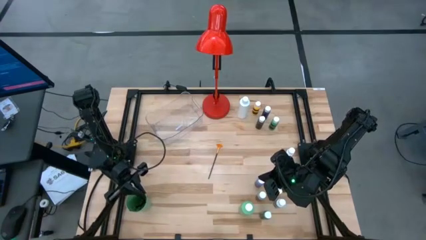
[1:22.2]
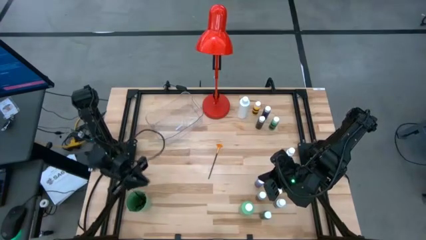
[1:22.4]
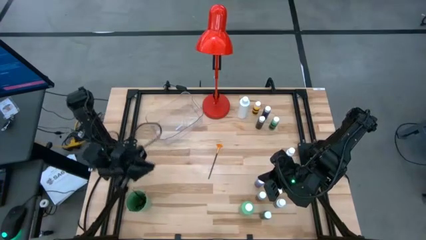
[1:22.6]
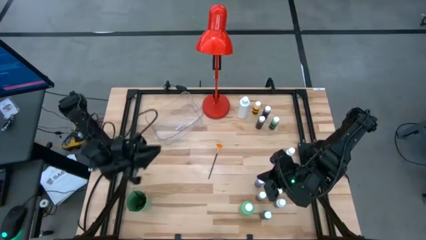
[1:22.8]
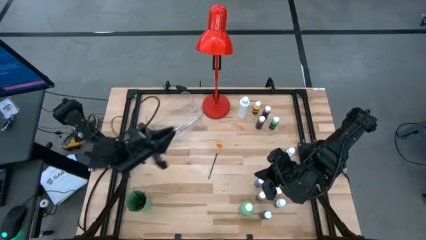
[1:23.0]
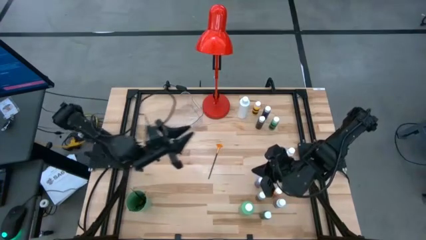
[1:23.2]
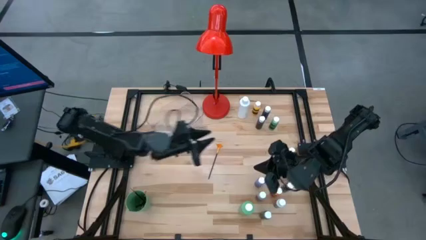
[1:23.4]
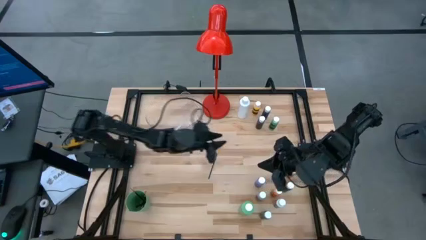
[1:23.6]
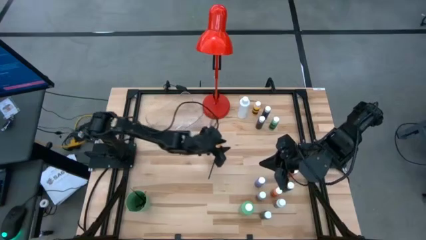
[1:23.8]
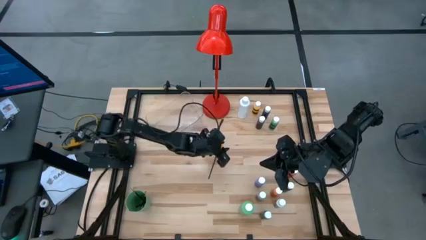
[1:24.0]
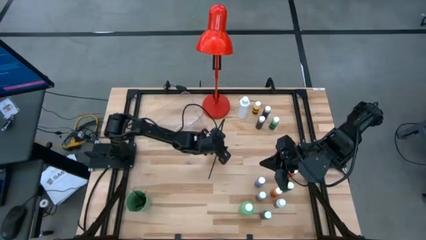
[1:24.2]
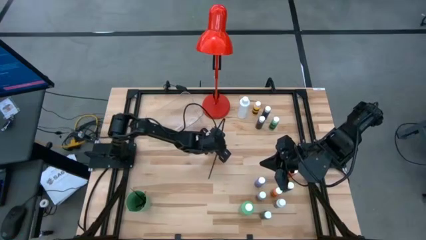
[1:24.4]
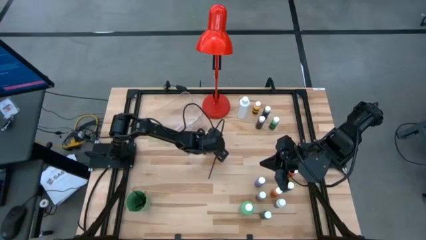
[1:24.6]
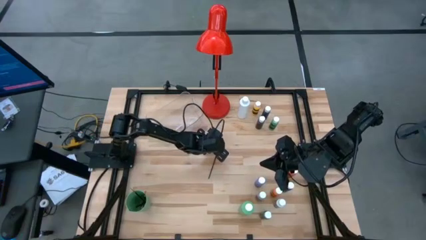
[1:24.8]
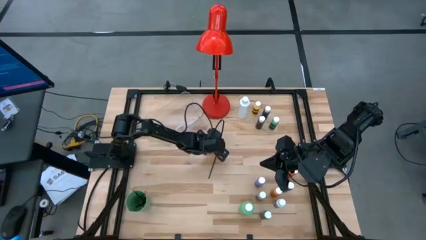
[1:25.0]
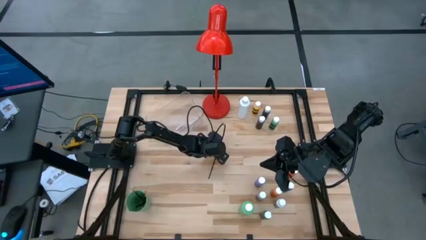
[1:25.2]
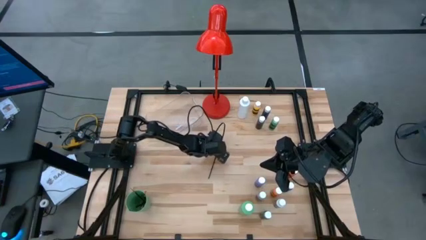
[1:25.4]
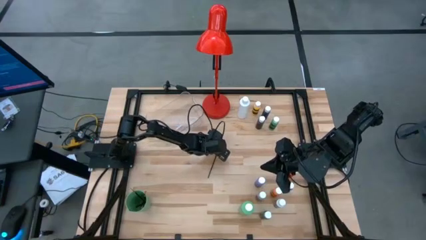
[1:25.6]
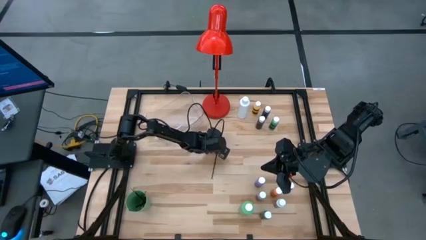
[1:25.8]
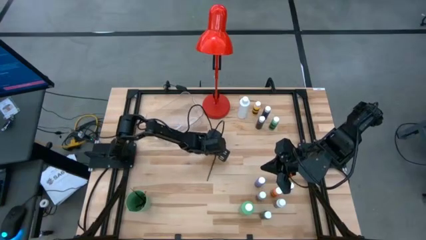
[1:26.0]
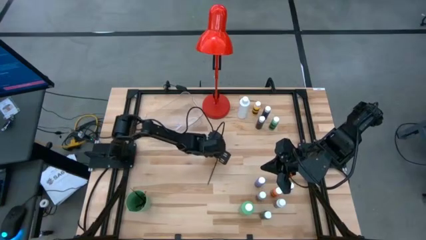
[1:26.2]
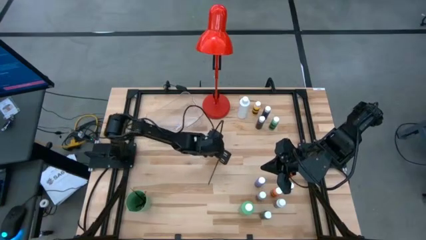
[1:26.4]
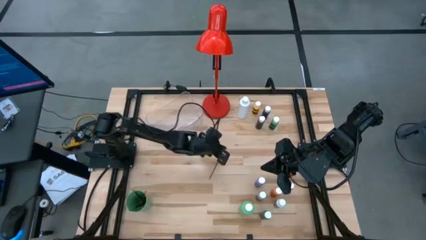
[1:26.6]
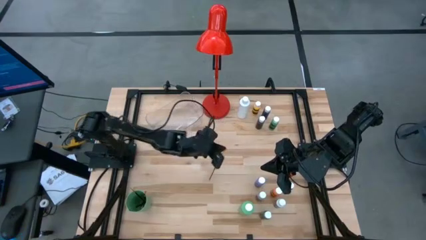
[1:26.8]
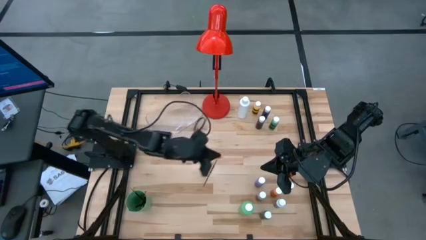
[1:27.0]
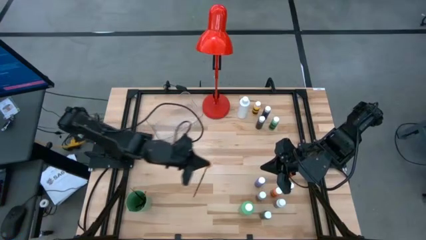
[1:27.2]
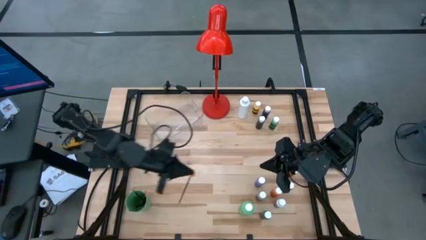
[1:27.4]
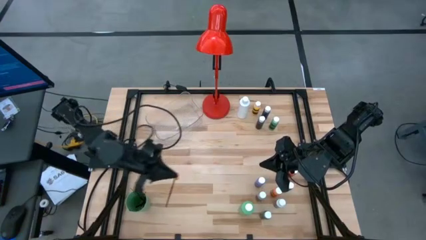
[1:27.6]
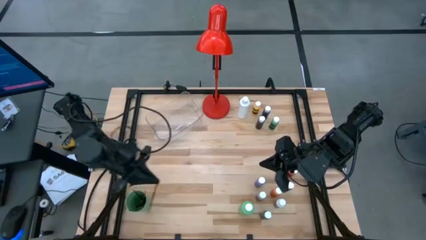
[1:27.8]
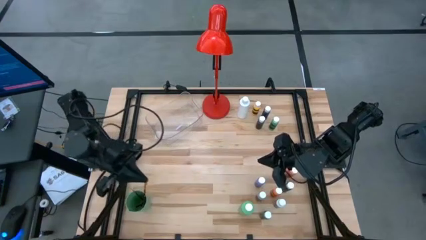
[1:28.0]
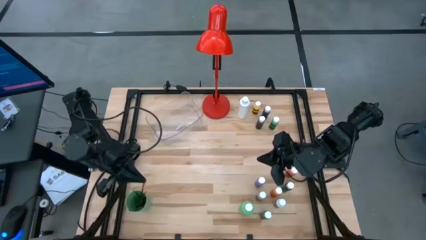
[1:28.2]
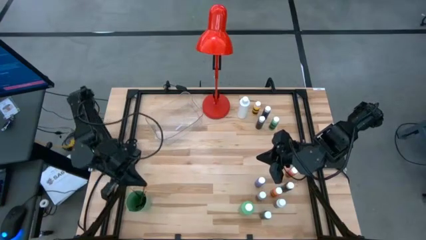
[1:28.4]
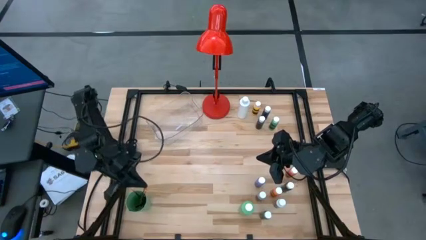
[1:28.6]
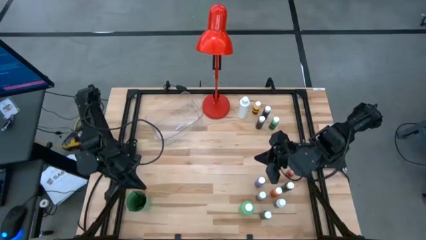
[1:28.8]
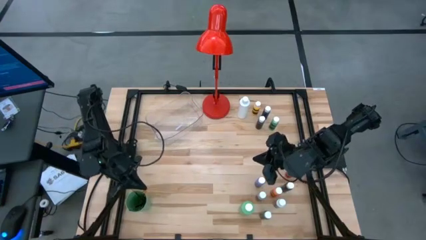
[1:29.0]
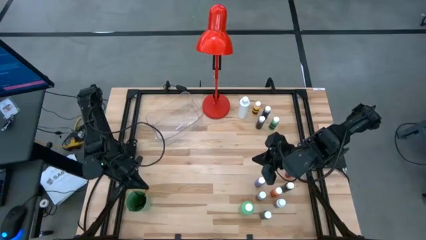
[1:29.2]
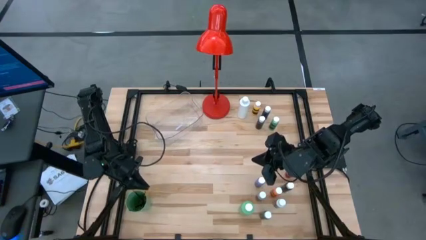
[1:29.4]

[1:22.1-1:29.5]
Task: Pick & Place Paint Supplies
Put the black paintbrush into the green cup
